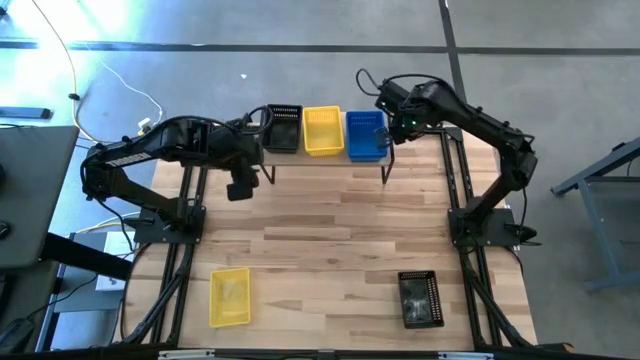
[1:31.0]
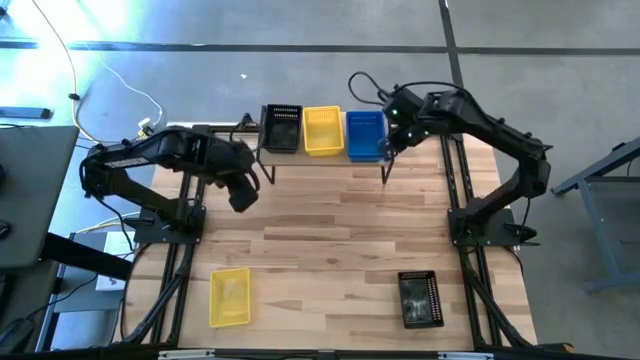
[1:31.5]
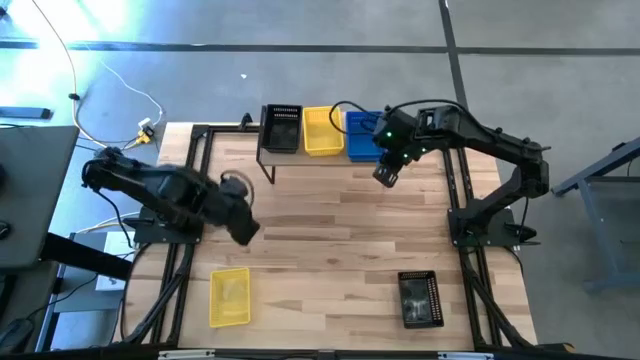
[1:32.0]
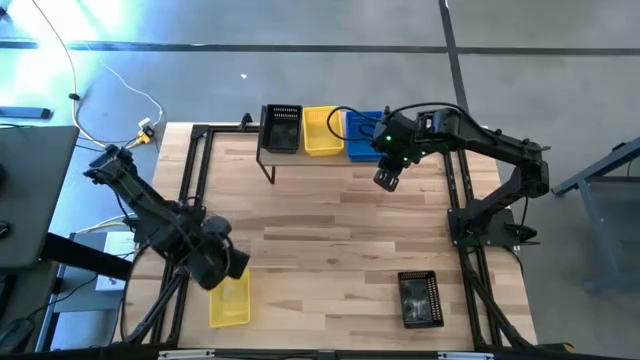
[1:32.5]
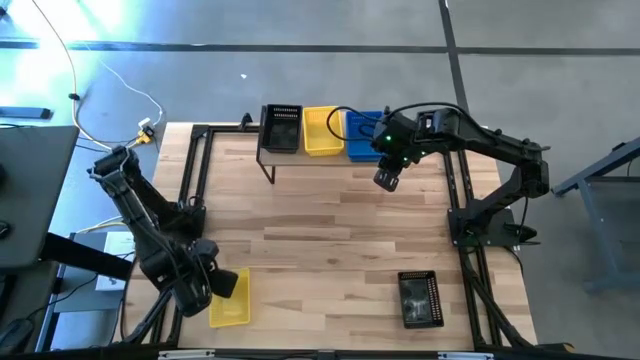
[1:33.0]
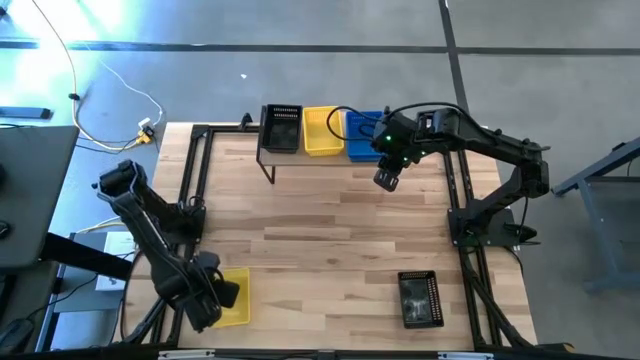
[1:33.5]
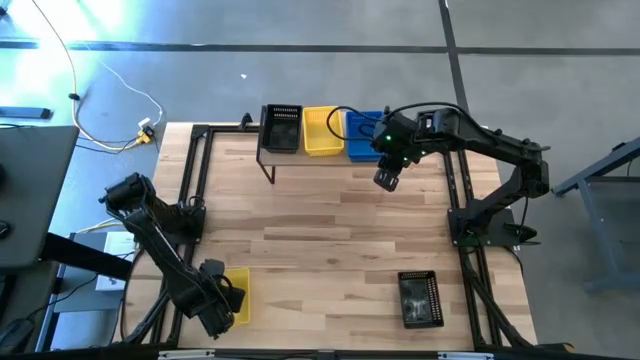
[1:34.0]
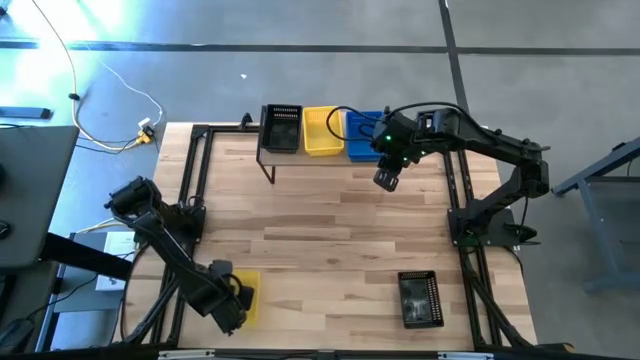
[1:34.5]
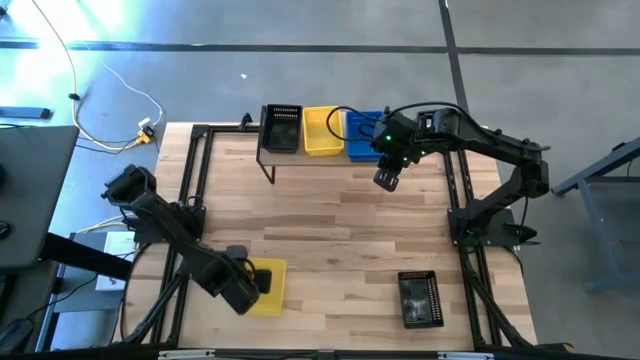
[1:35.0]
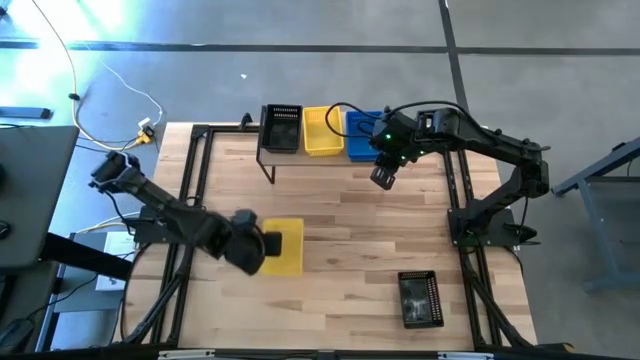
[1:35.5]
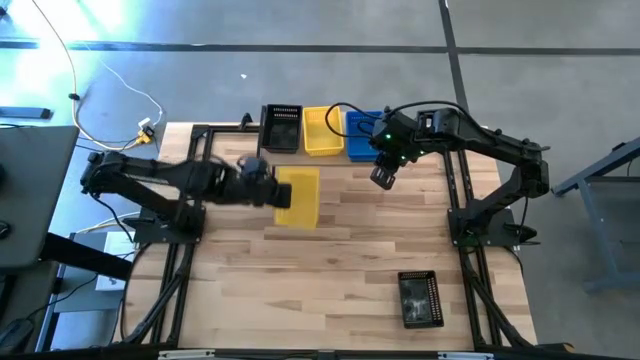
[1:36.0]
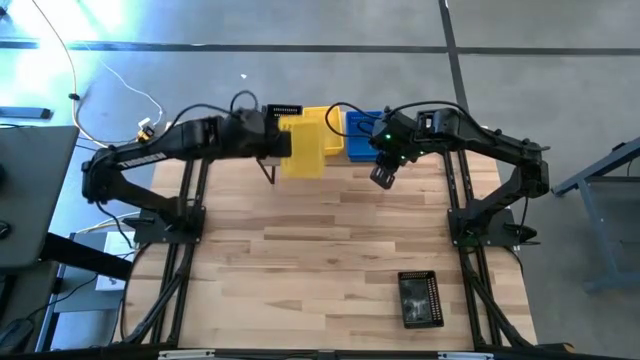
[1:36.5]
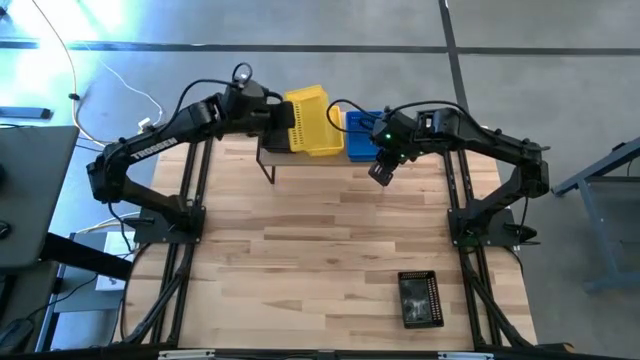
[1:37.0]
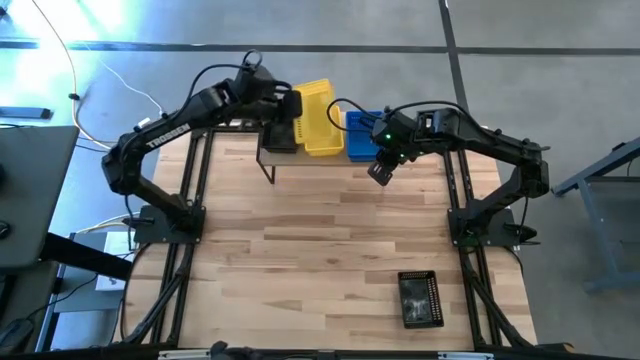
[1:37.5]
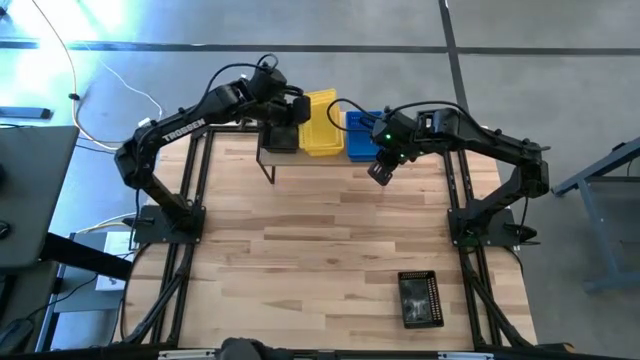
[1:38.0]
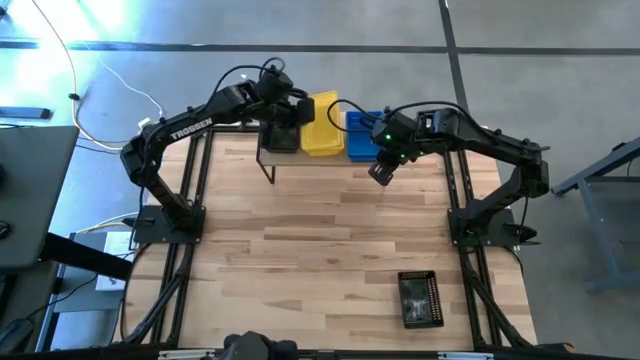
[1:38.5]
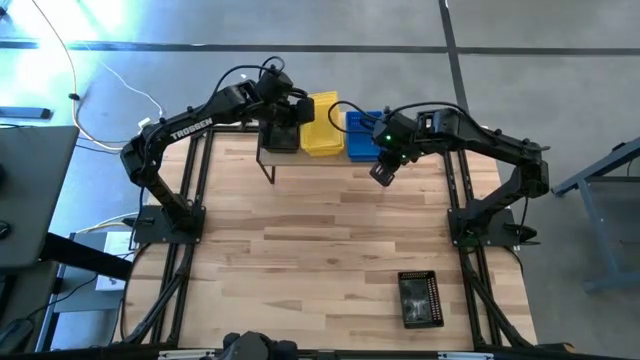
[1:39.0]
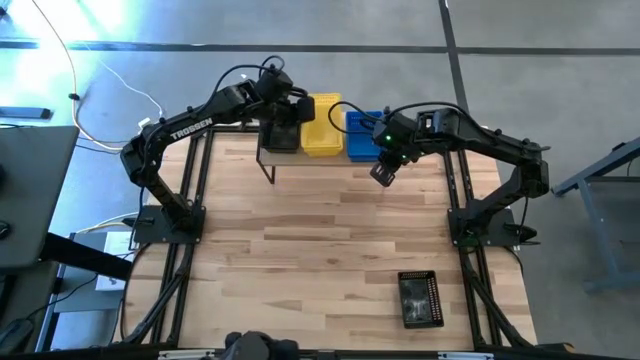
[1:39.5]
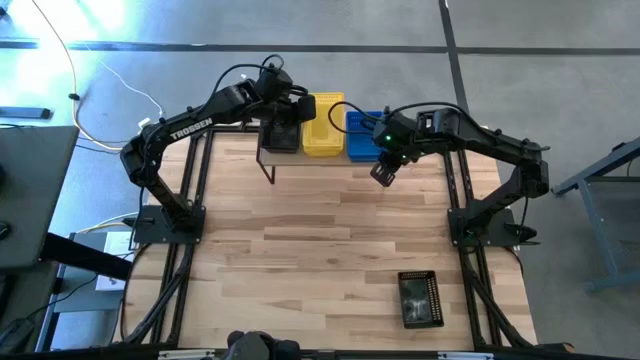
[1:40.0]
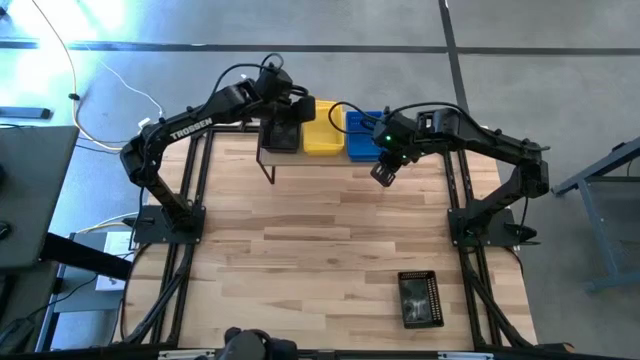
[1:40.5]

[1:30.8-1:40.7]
Task: Stack baskets on shelf by color
Stack the yellow bin on top of the yellow bins on the shelf

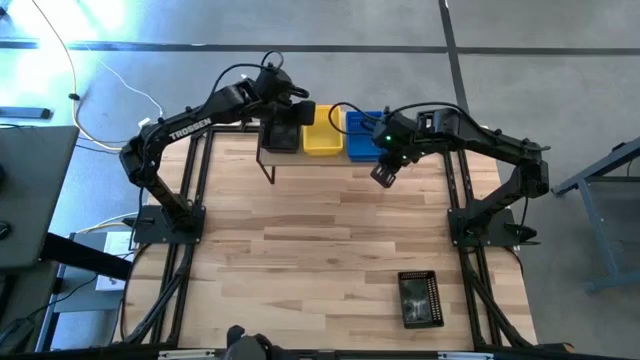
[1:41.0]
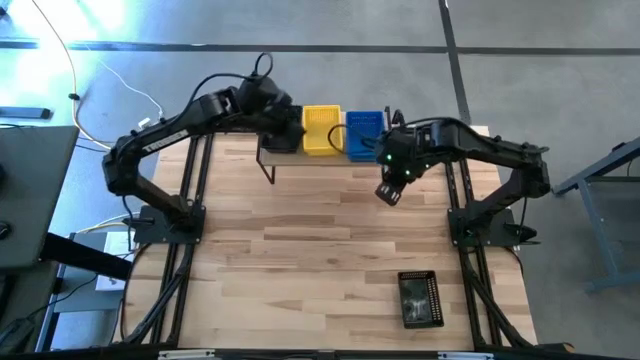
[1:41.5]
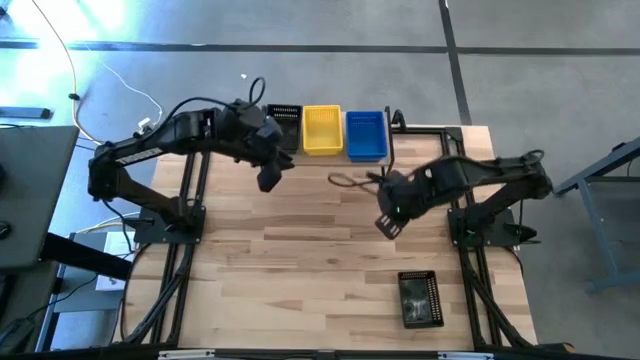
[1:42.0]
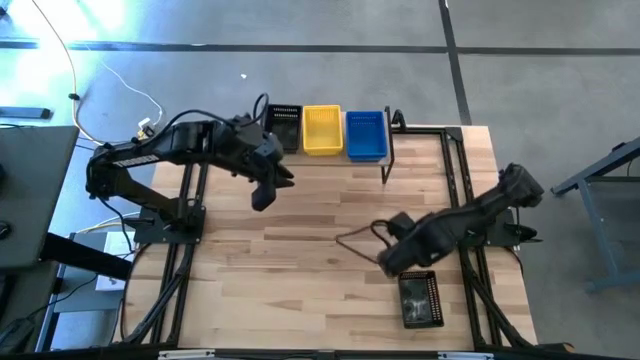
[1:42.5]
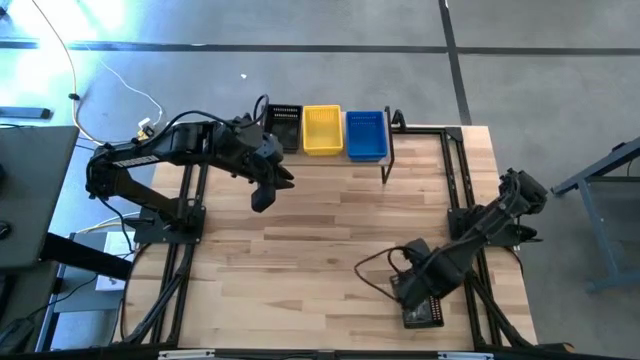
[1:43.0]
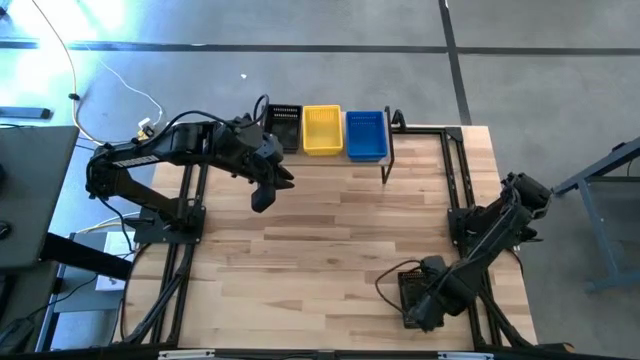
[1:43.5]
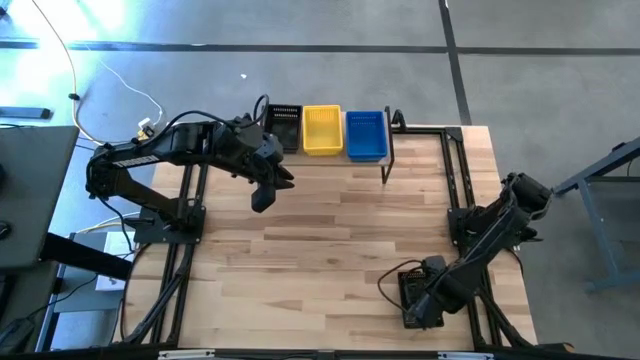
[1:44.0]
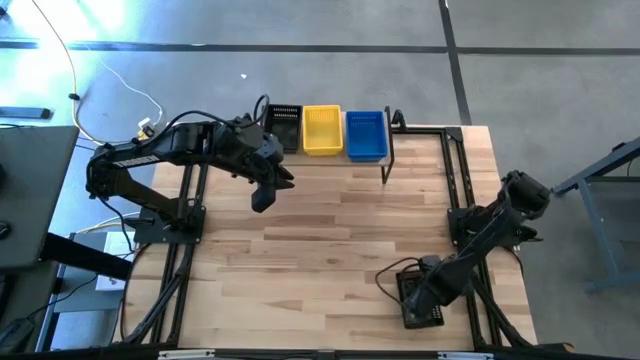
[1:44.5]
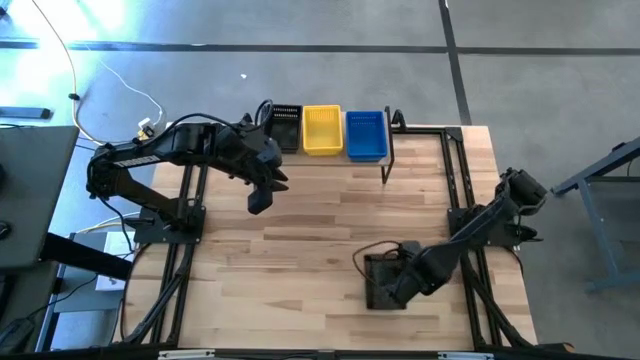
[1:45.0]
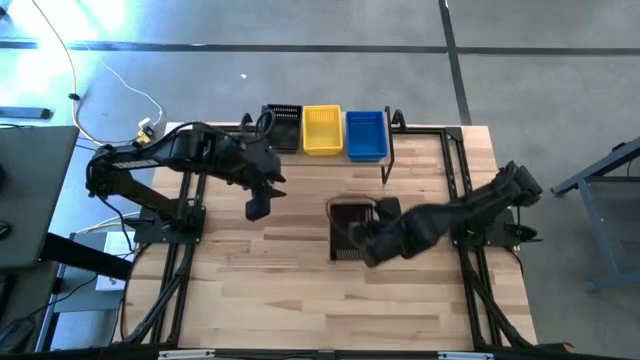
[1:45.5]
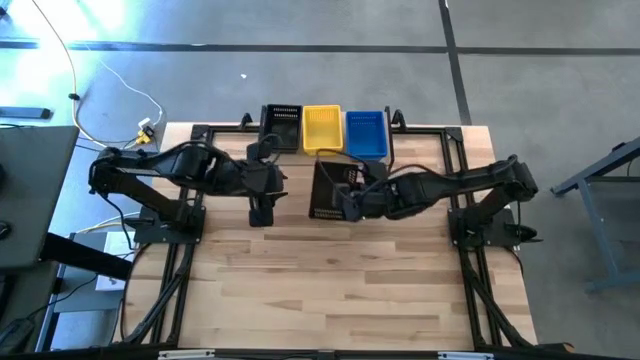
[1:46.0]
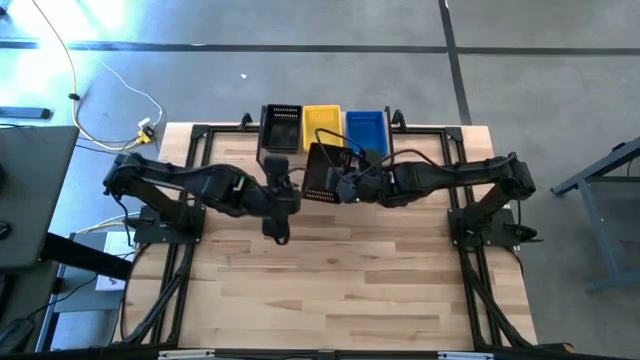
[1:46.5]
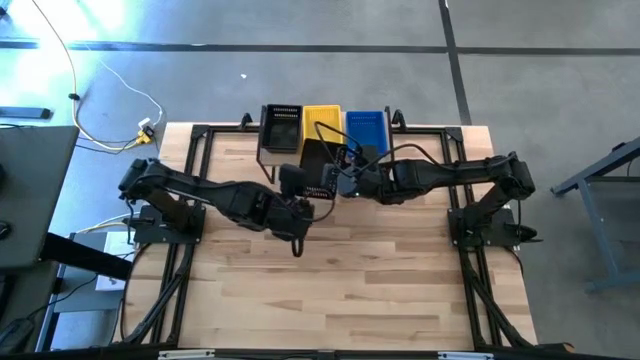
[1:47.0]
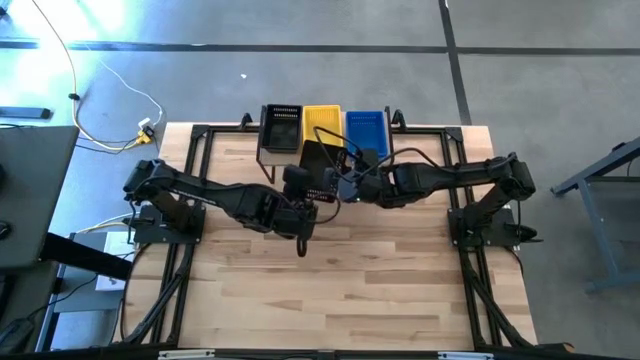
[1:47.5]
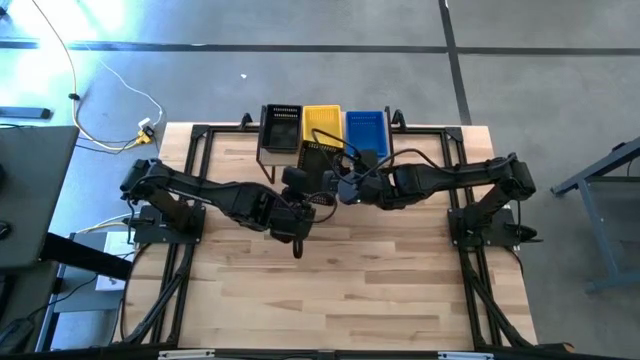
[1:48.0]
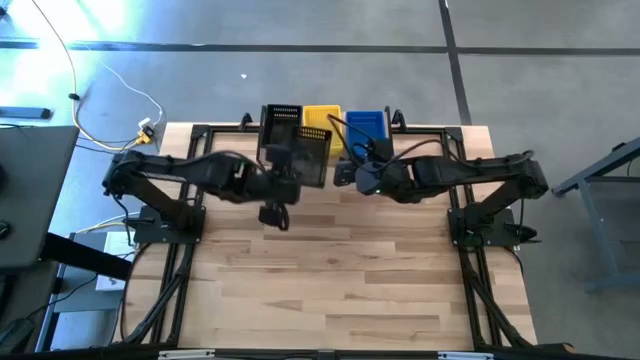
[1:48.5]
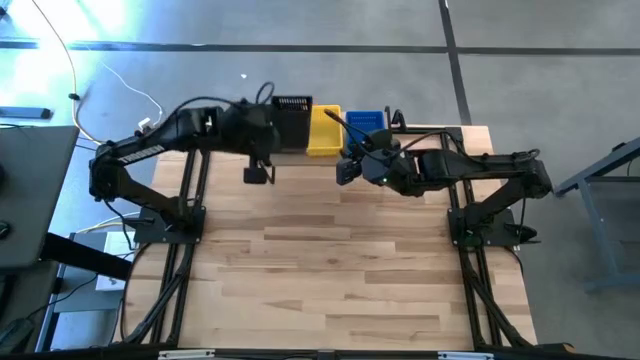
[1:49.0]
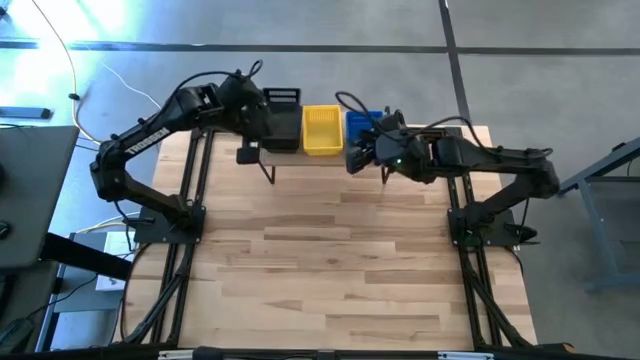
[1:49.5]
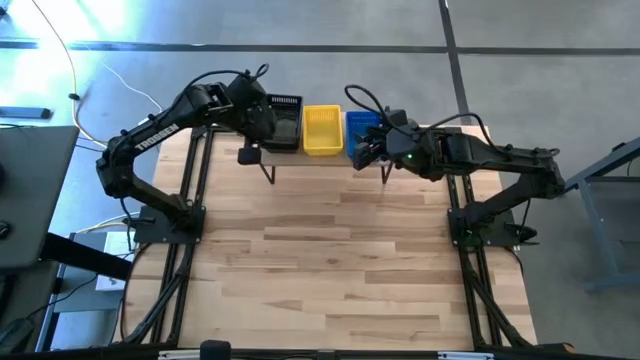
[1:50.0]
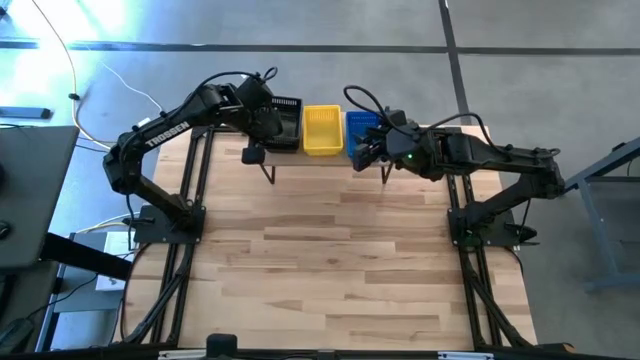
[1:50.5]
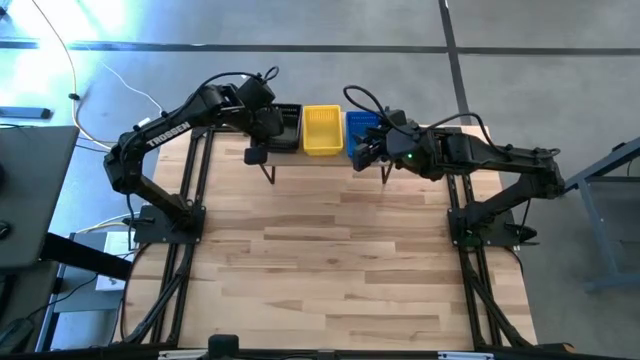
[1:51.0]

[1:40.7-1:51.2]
Stack the black bin on top of the black bins on the shelf

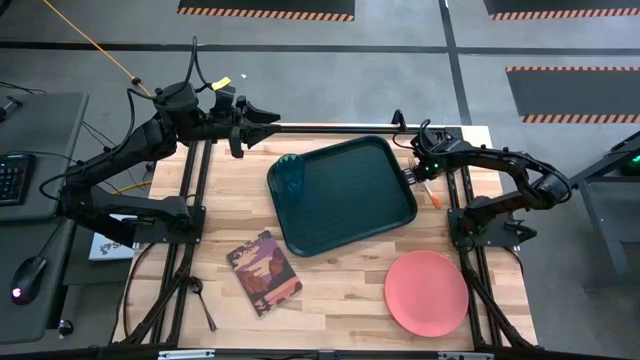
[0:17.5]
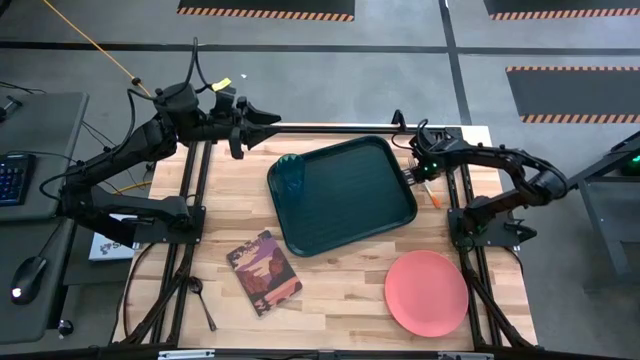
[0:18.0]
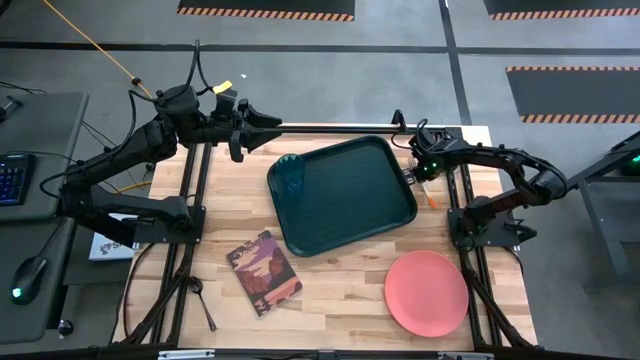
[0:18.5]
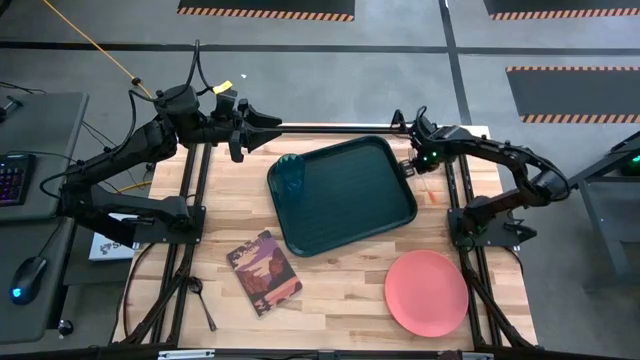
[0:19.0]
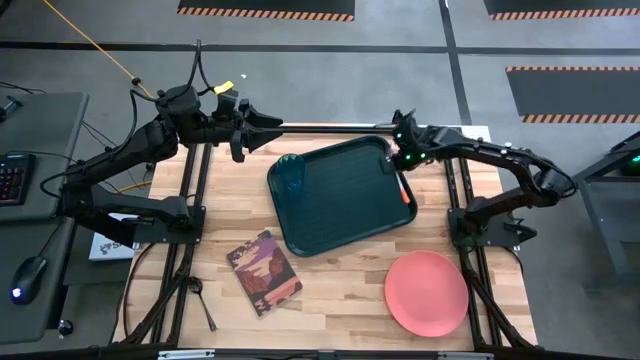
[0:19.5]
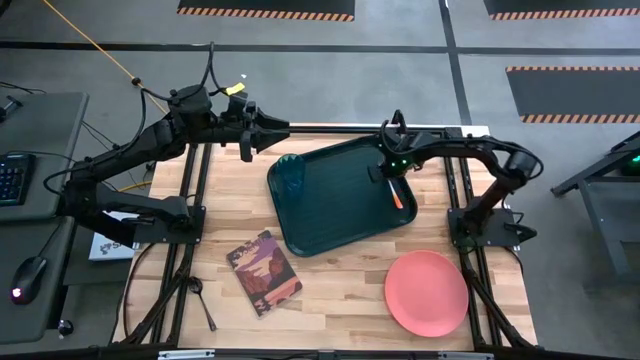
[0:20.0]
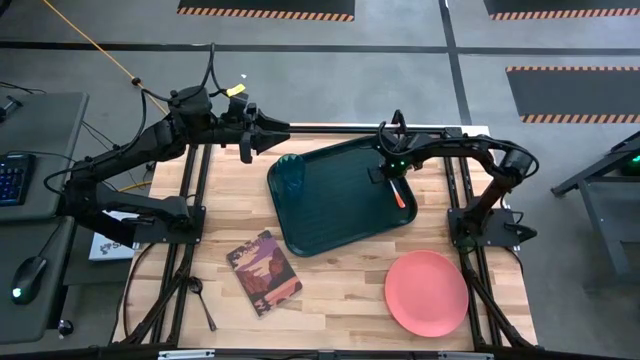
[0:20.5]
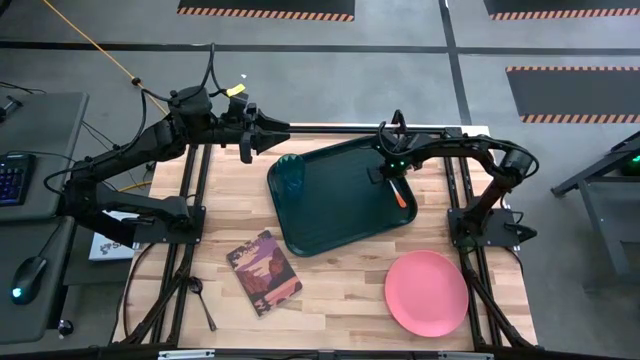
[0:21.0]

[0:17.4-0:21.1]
Task: Pick and place plate/cup/fork/spoon on tray
Put the orange fork on the black tray
